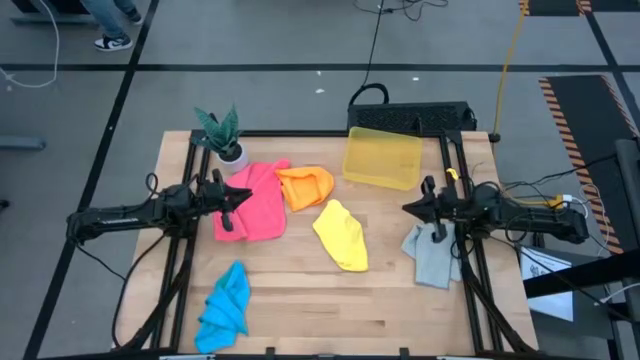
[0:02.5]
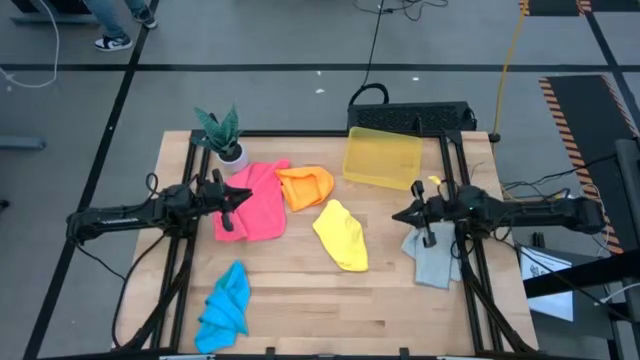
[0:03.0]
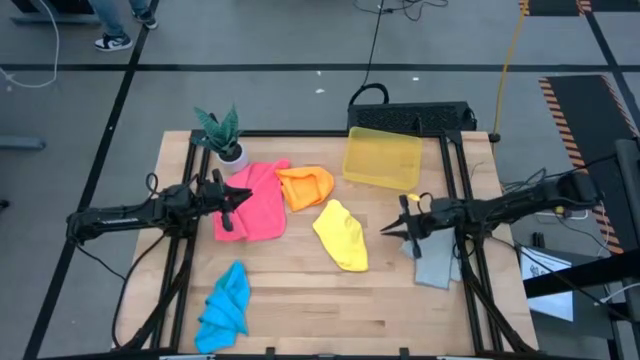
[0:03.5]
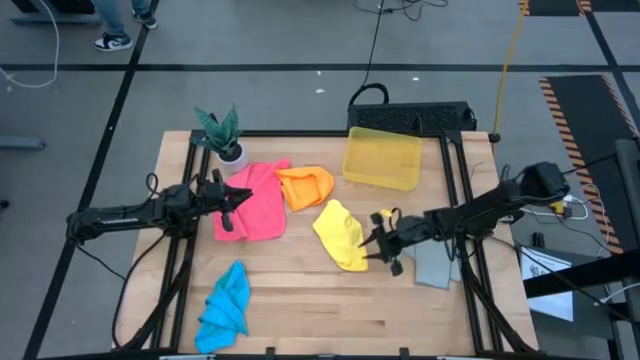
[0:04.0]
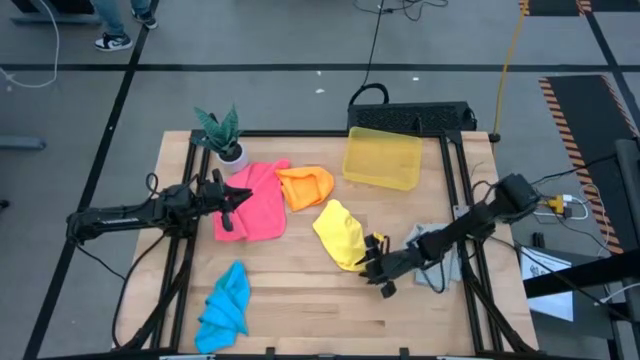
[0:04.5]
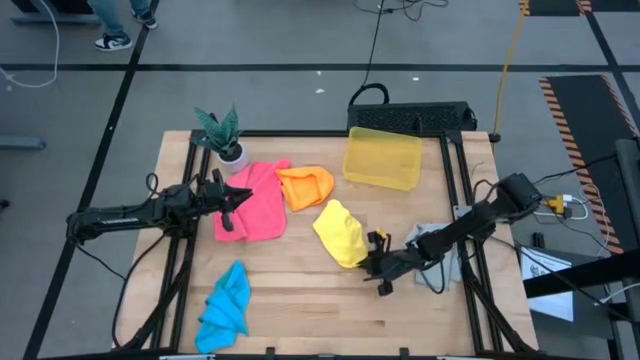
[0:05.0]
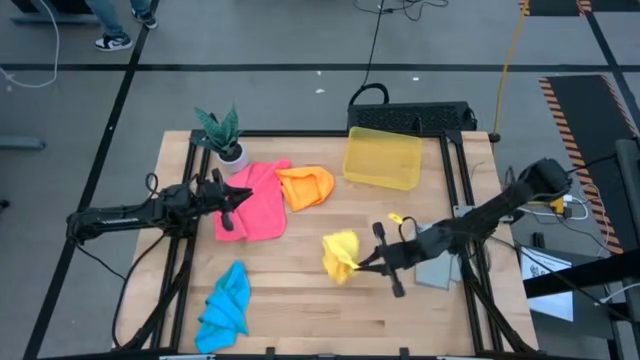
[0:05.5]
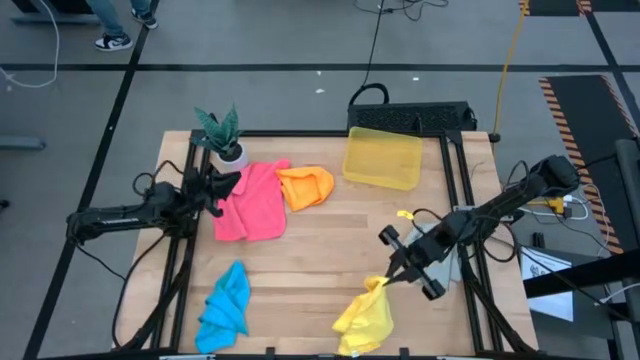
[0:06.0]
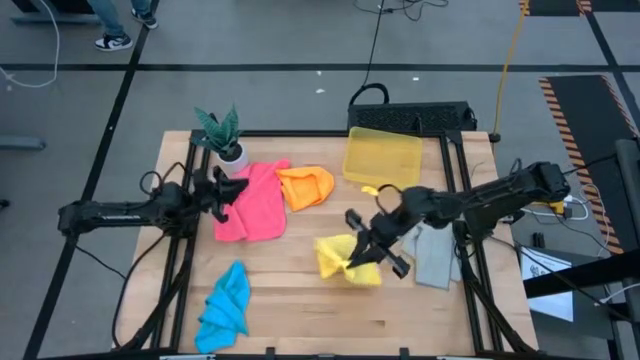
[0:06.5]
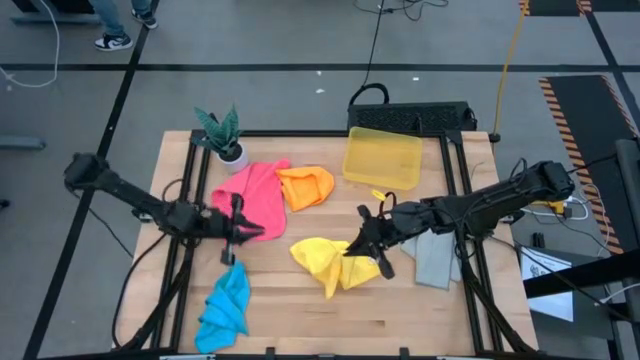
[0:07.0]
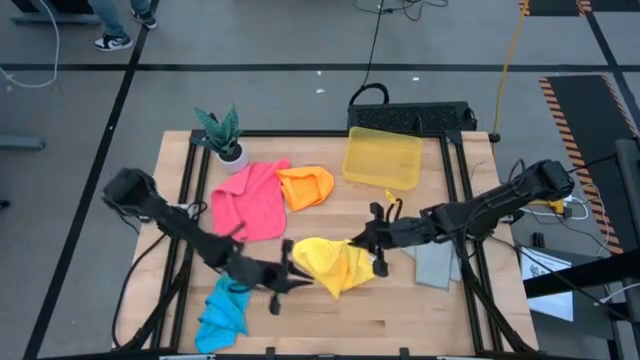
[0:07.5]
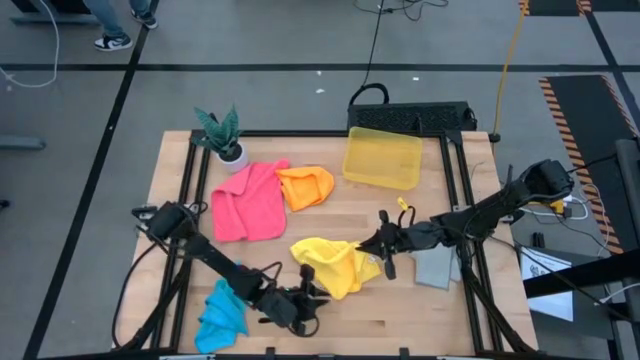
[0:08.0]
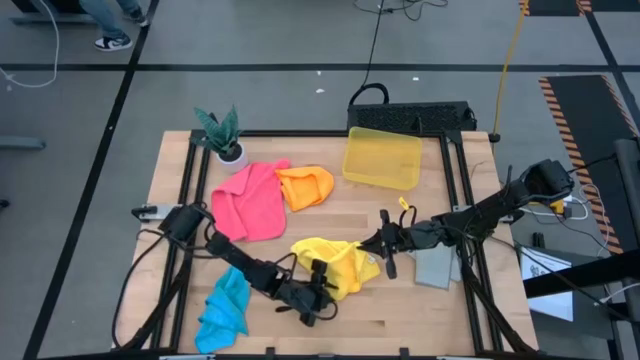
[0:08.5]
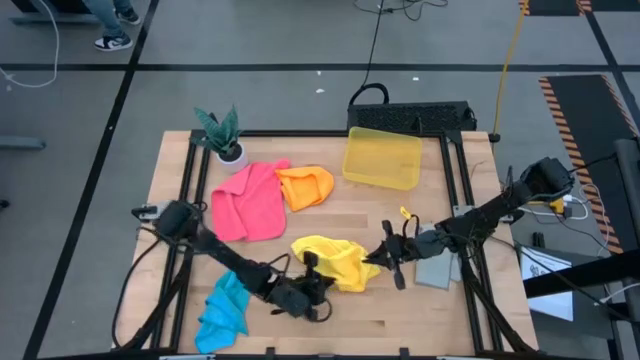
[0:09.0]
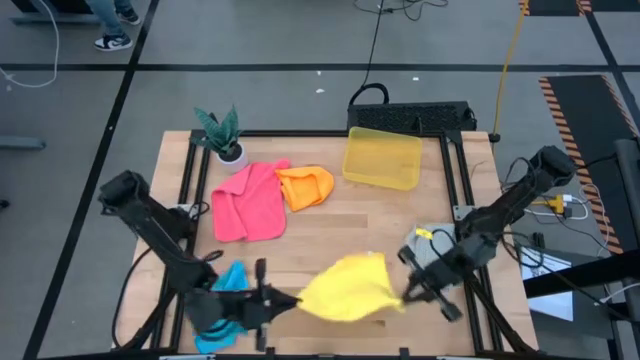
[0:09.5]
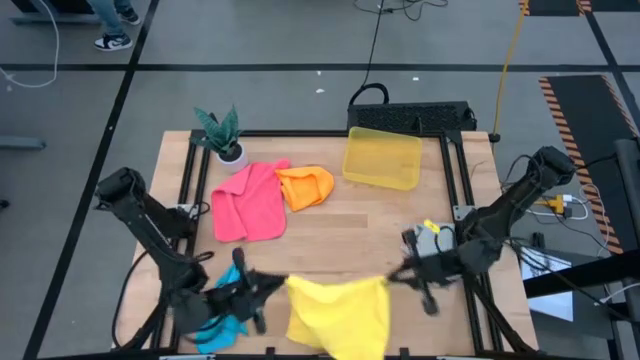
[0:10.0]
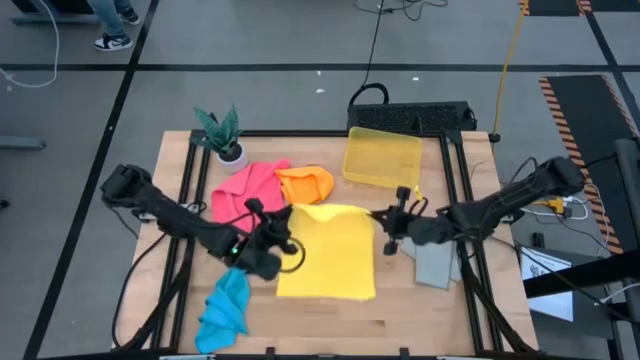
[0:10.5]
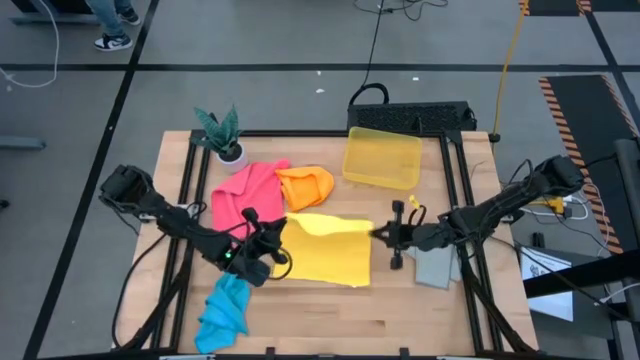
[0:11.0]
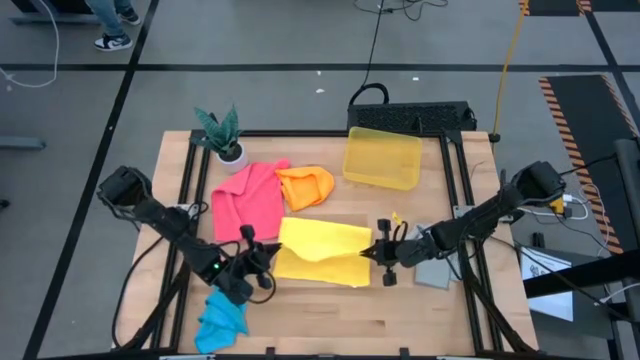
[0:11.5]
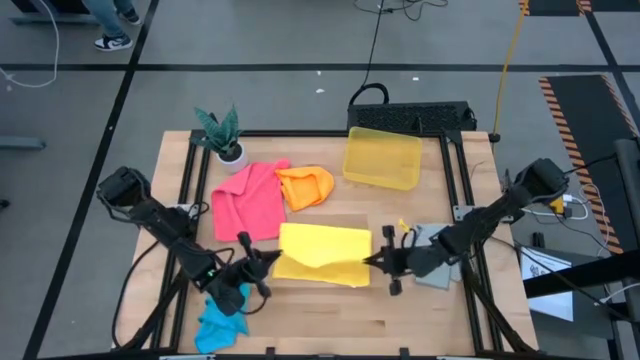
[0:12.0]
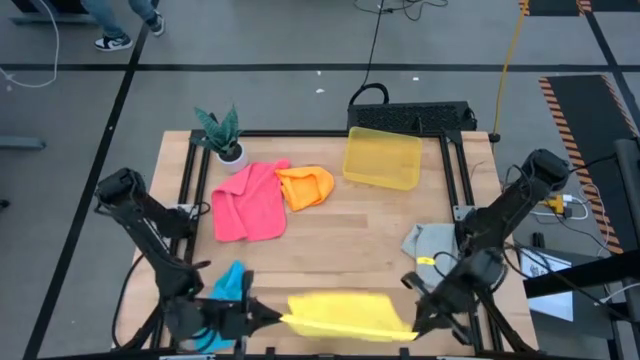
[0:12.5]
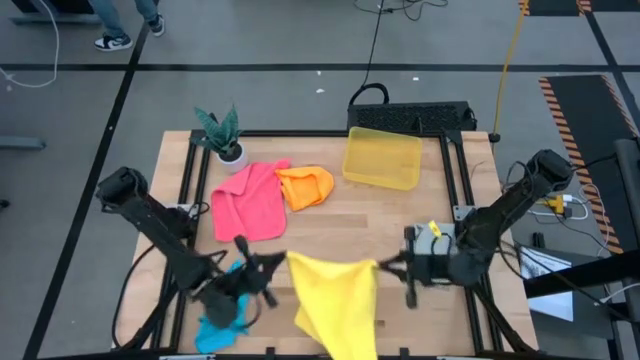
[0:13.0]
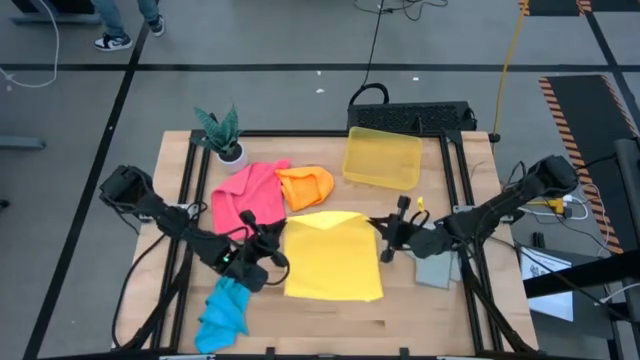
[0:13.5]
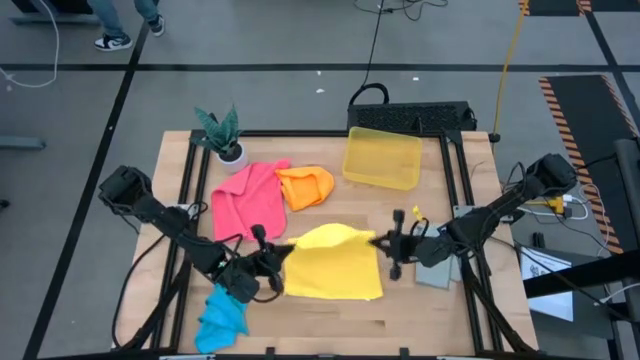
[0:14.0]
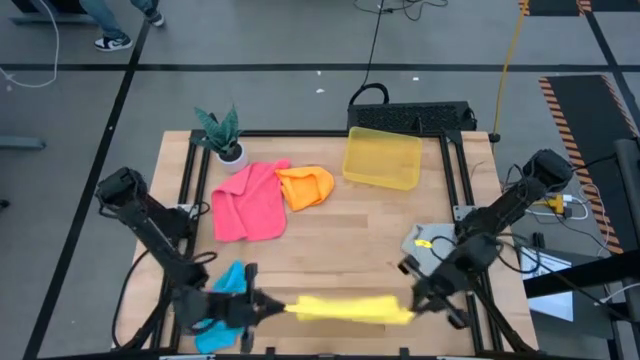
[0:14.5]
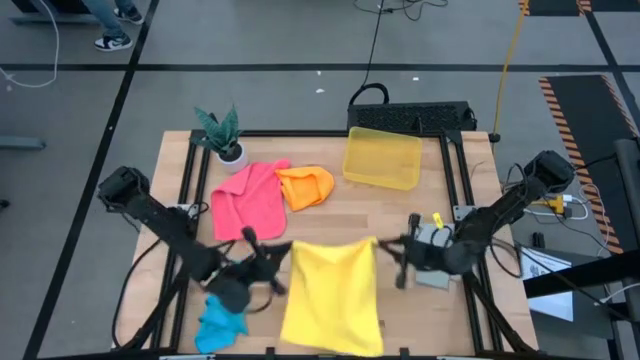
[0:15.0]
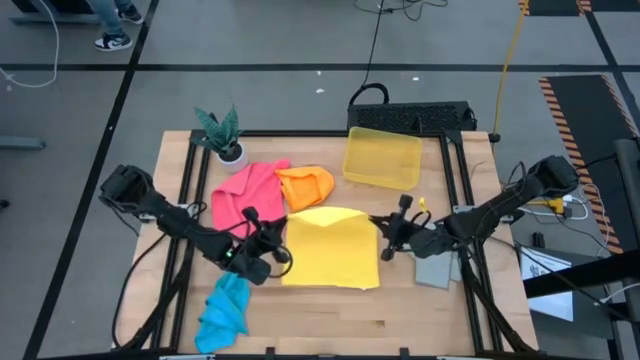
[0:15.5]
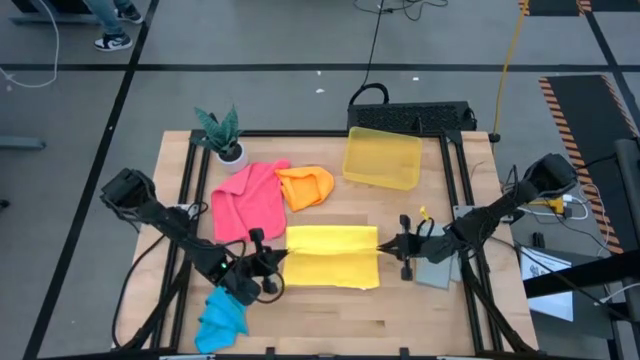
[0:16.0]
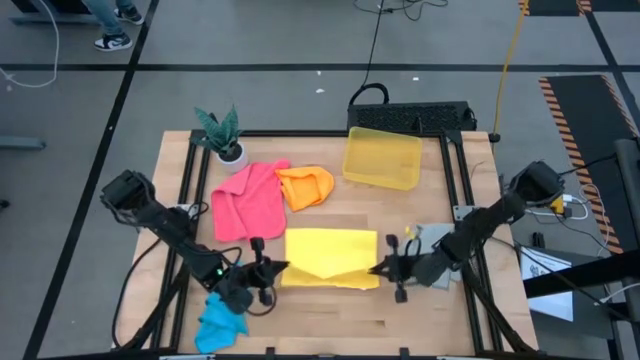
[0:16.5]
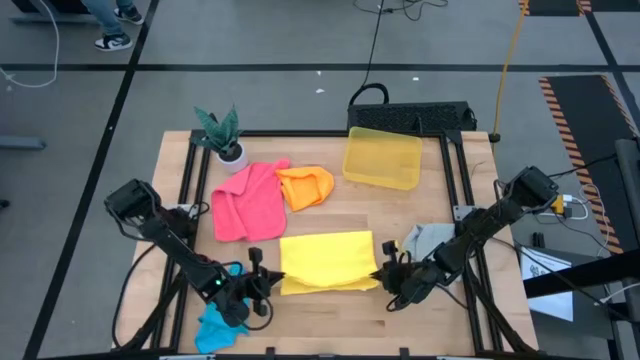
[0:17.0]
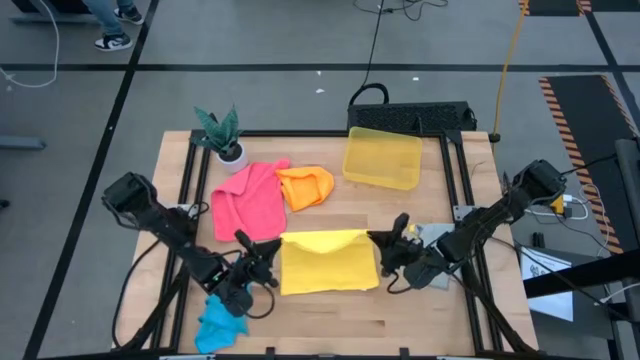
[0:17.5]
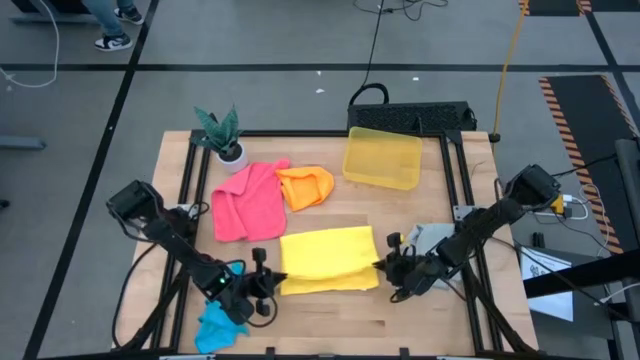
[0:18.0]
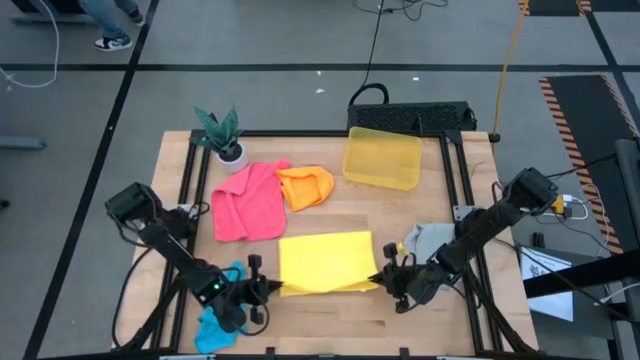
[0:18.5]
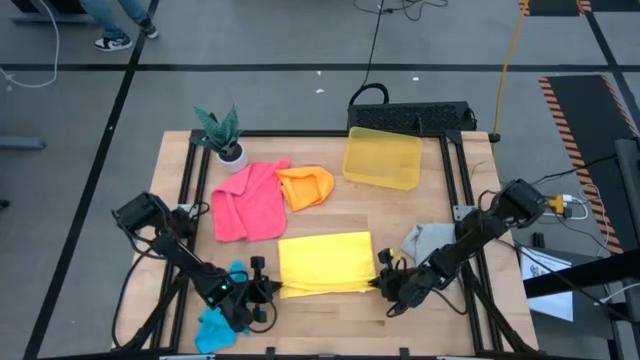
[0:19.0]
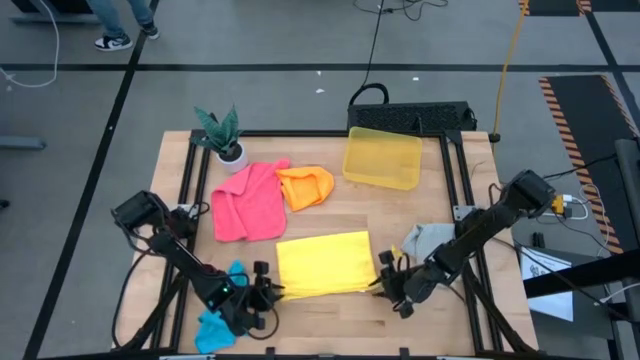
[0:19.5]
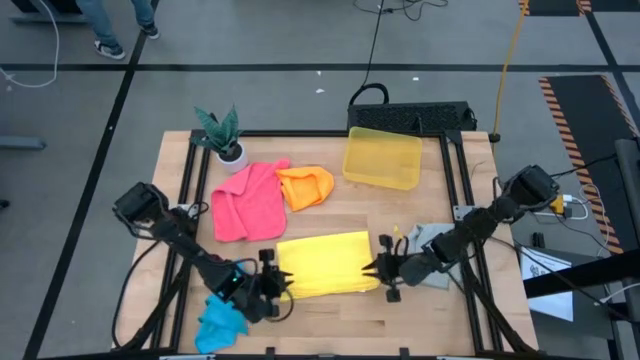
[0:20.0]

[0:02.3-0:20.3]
Task: Fold microfiber towels
Fold the yellow kitchen towel
